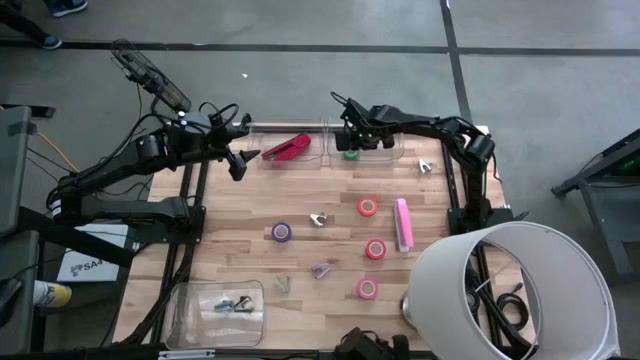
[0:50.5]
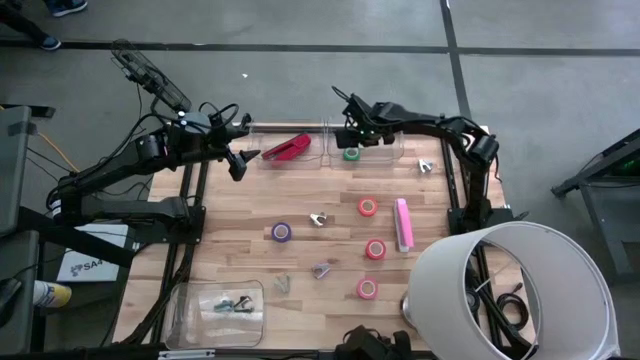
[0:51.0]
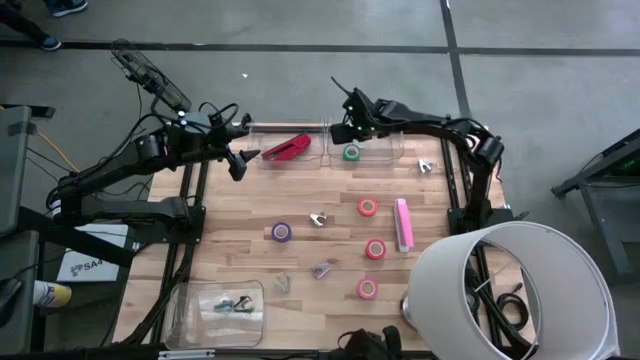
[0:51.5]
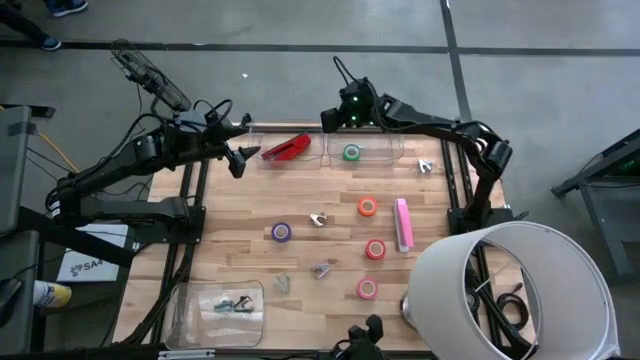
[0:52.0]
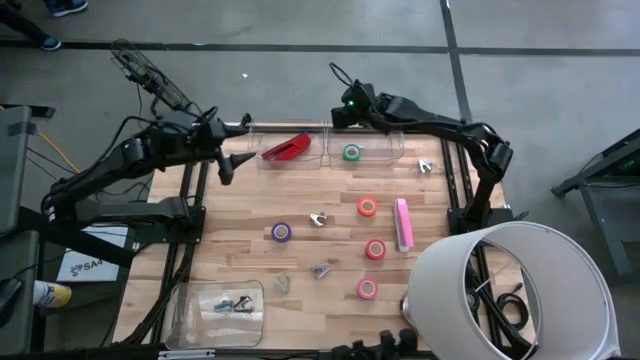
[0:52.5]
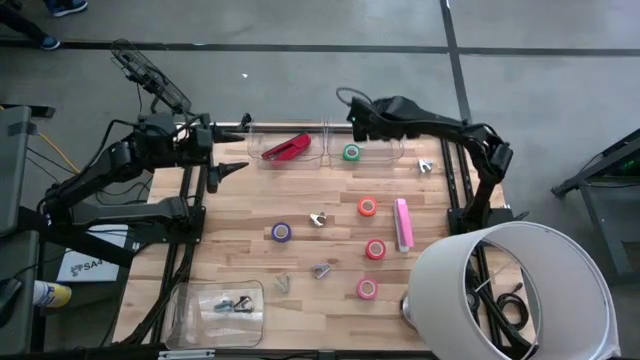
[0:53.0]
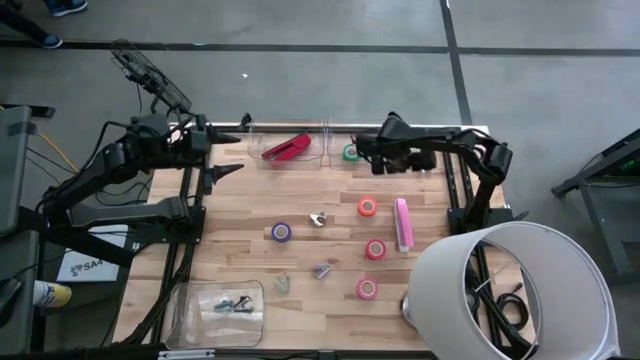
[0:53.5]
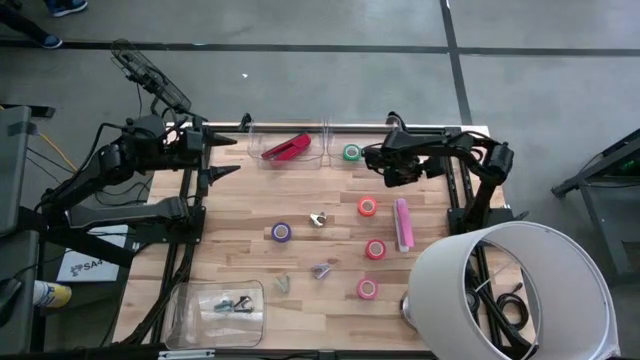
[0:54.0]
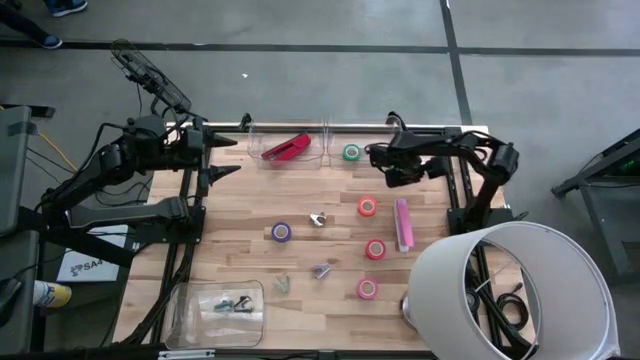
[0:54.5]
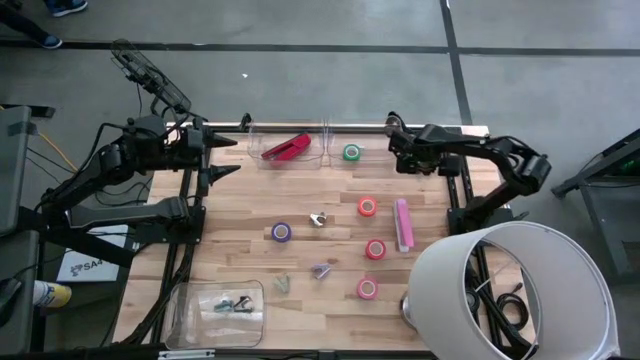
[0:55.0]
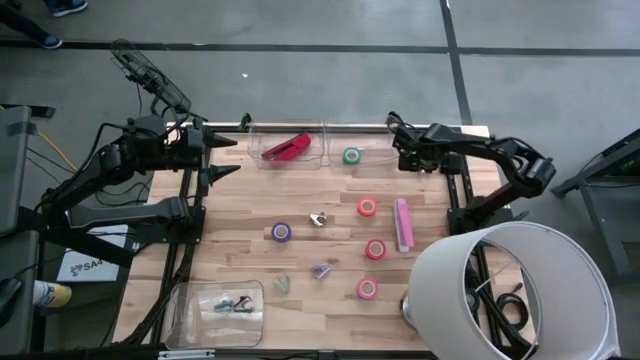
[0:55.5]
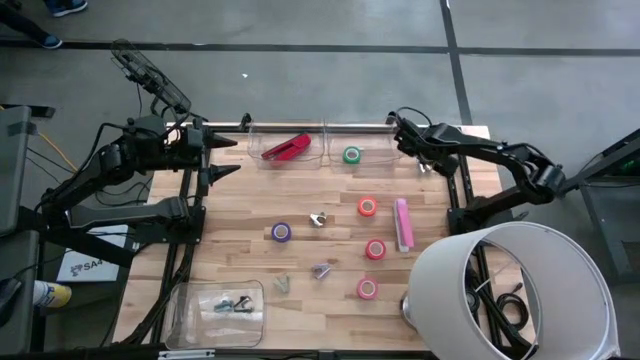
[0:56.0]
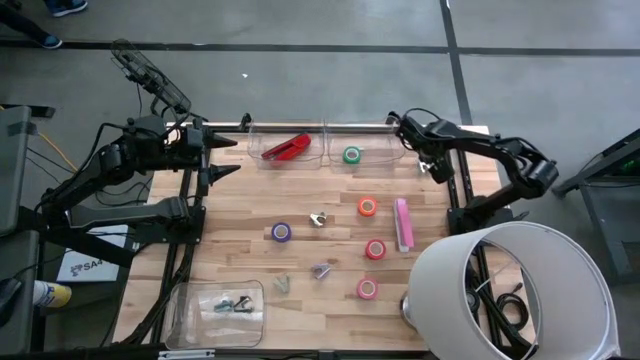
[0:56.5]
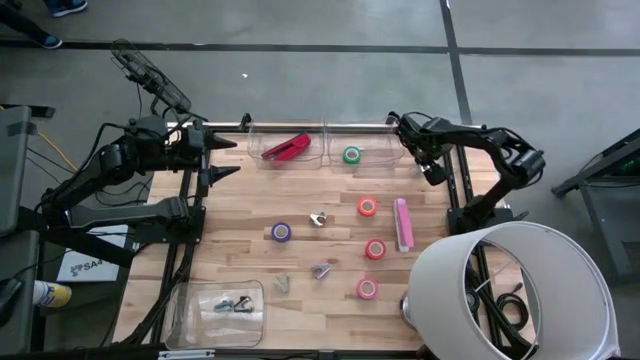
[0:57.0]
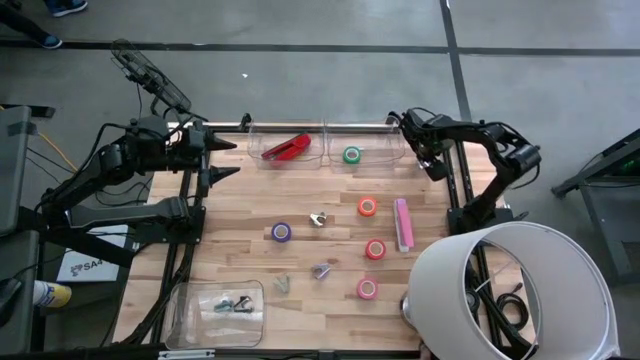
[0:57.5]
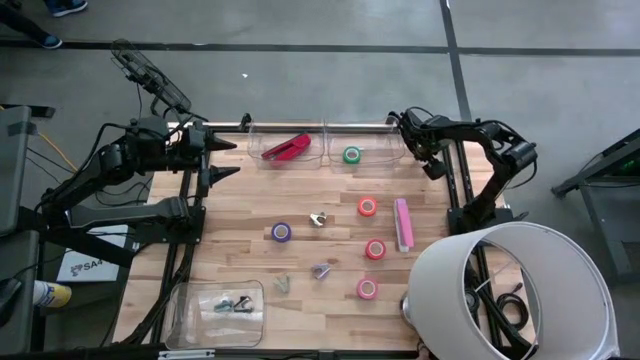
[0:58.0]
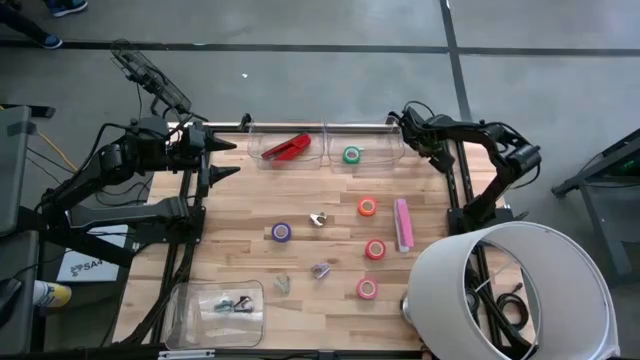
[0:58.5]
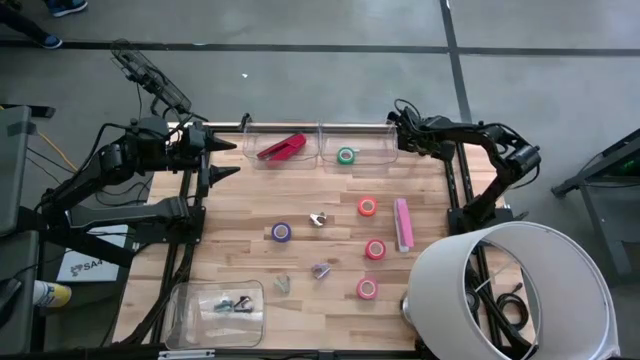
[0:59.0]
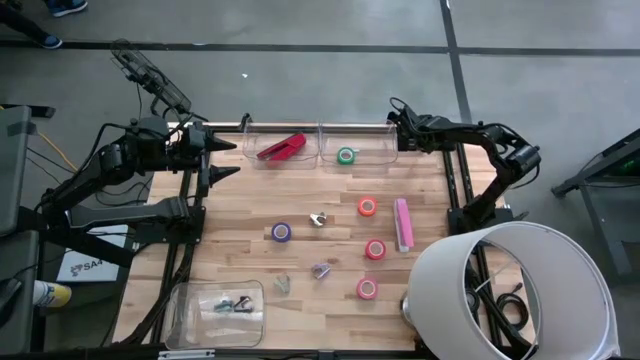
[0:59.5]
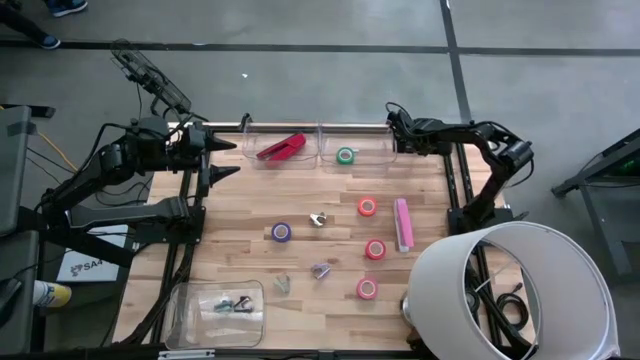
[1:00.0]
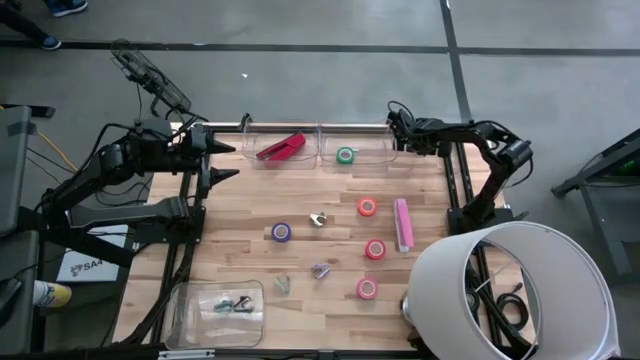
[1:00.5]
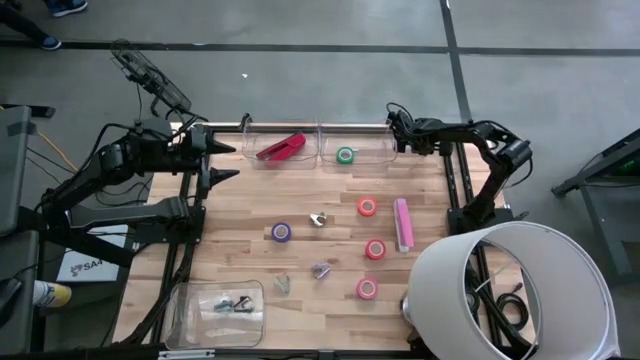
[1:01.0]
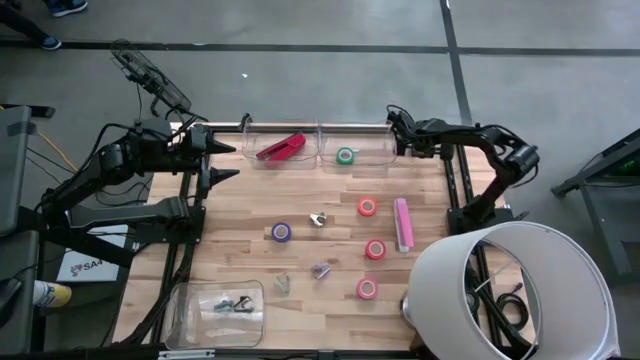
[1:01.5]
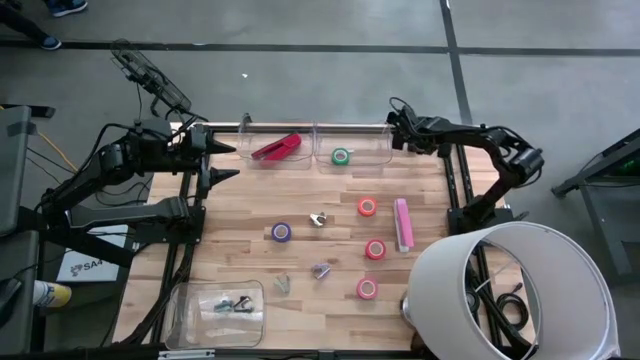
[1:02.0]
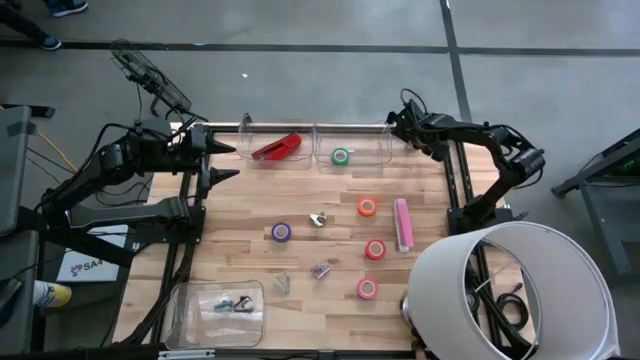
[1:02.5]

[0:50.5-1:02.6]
Task: Pick and place Stapler, Stapler remover, tape
Put the blue stapler remover into the bottom transparent bin

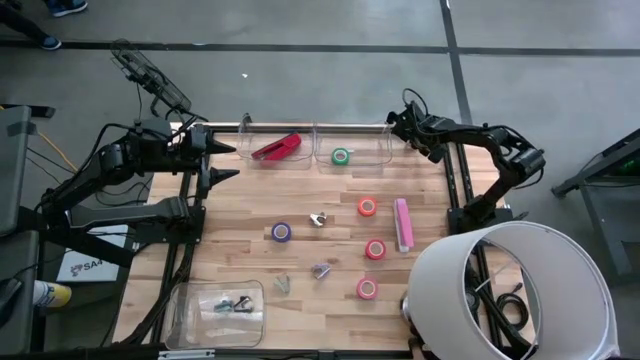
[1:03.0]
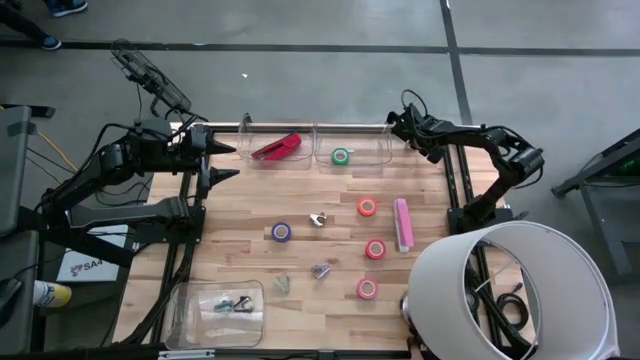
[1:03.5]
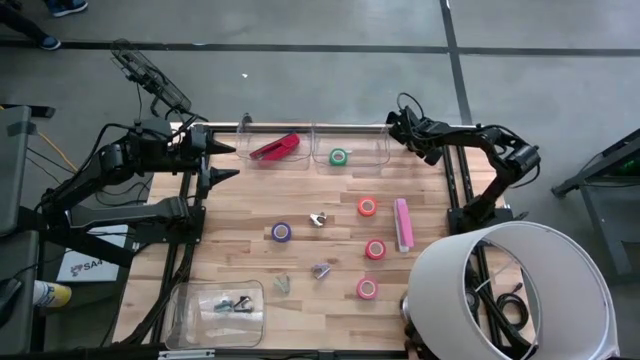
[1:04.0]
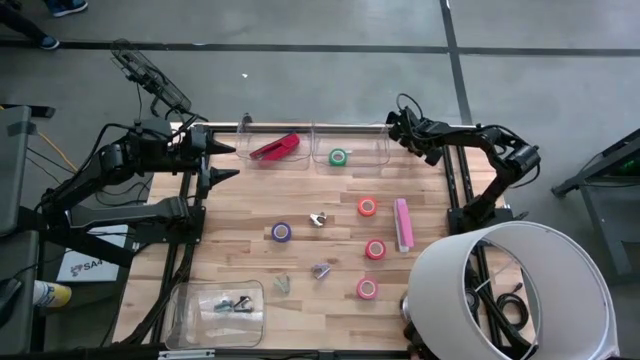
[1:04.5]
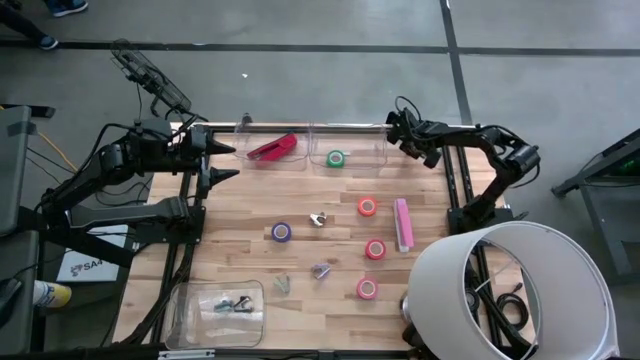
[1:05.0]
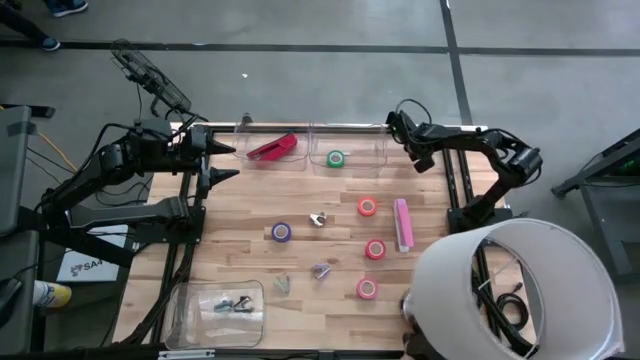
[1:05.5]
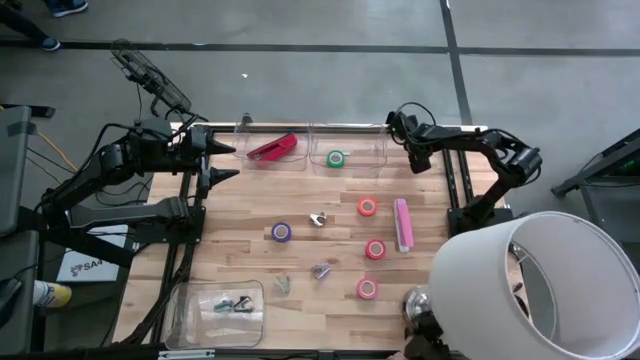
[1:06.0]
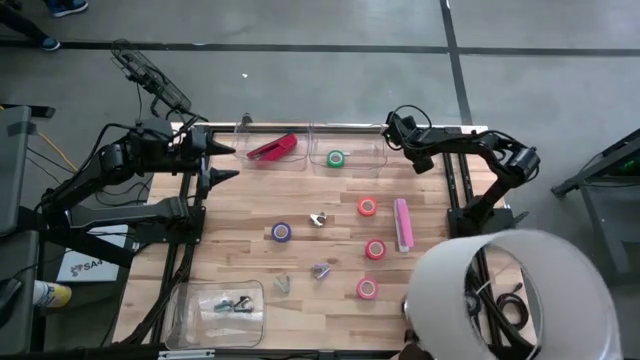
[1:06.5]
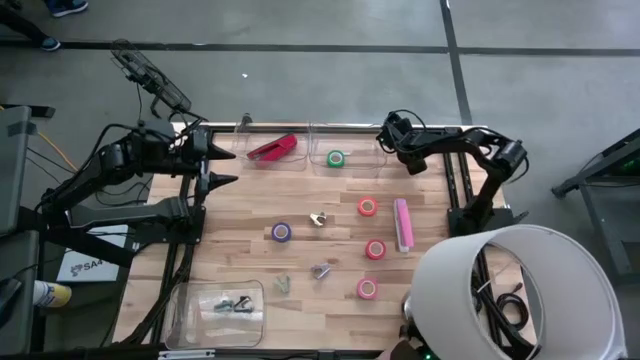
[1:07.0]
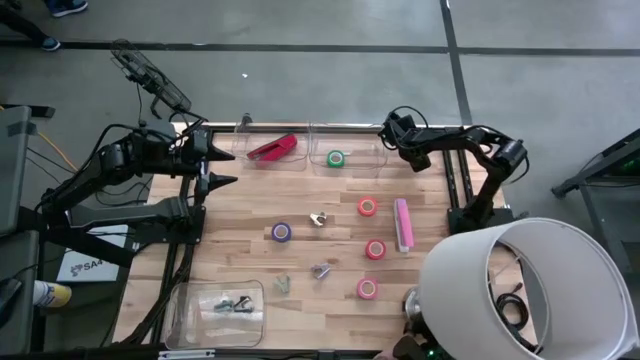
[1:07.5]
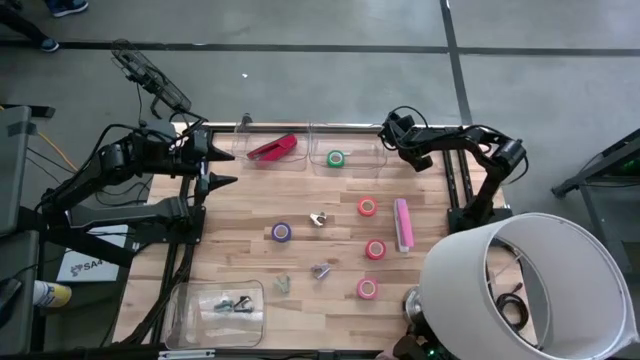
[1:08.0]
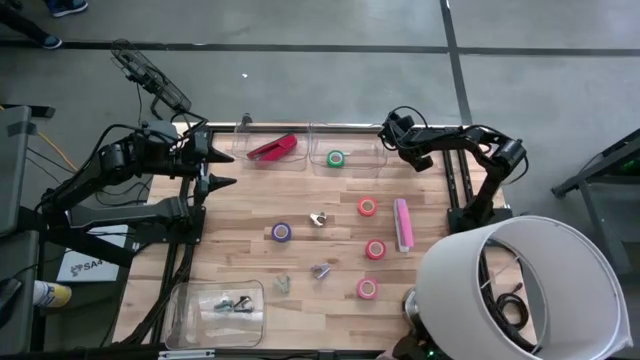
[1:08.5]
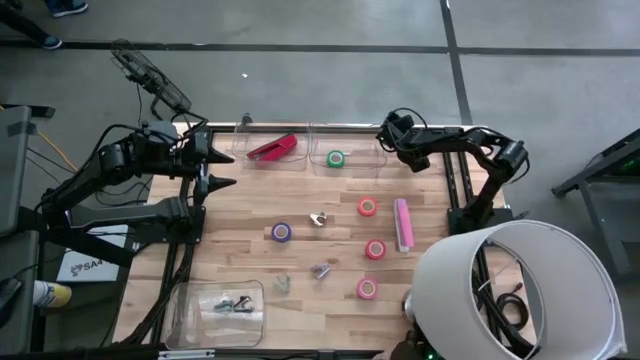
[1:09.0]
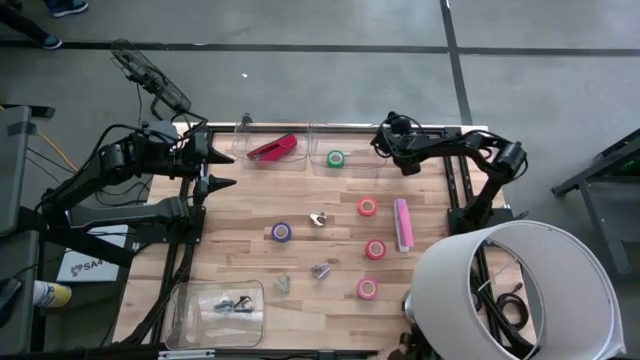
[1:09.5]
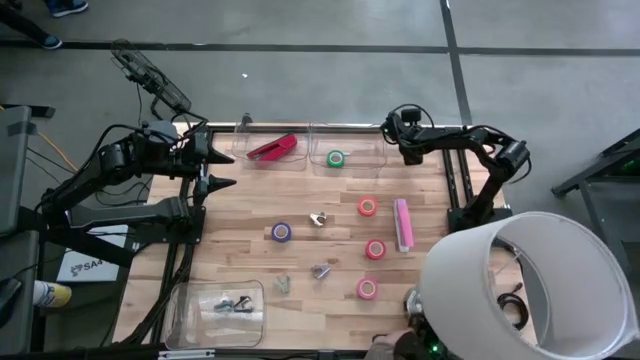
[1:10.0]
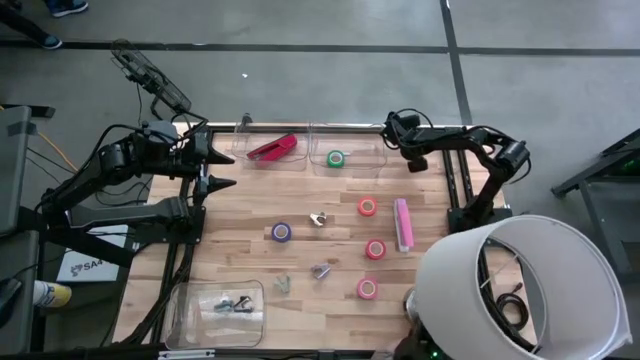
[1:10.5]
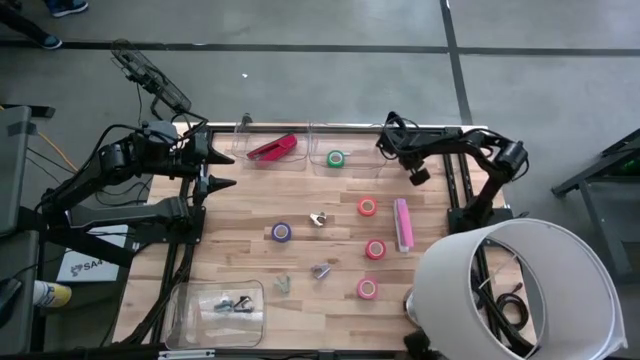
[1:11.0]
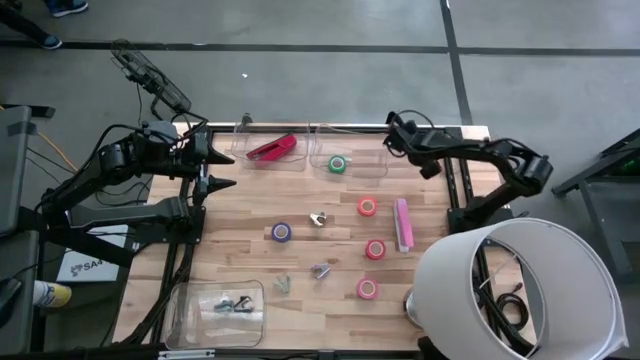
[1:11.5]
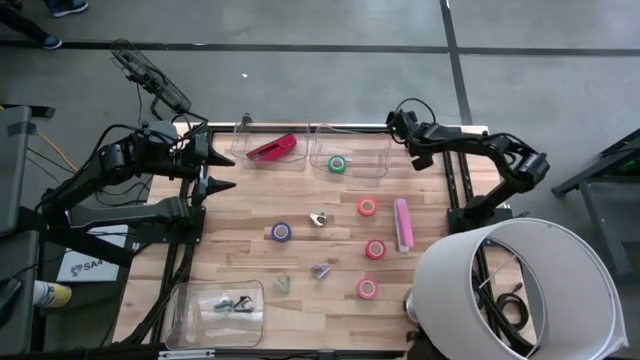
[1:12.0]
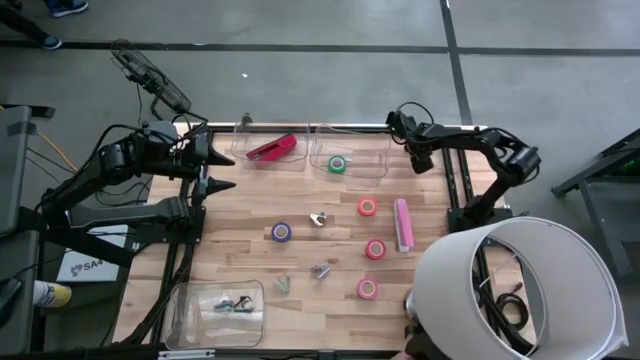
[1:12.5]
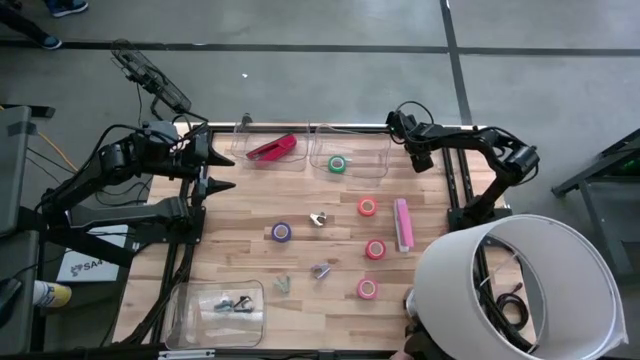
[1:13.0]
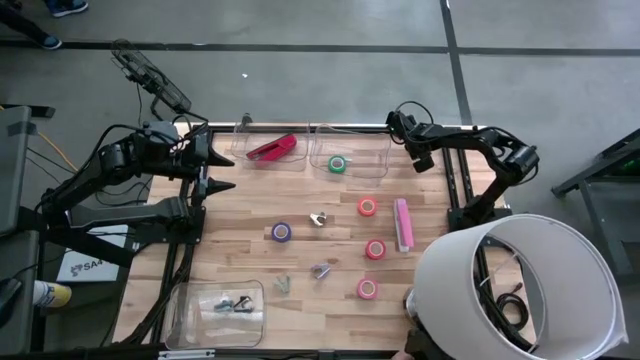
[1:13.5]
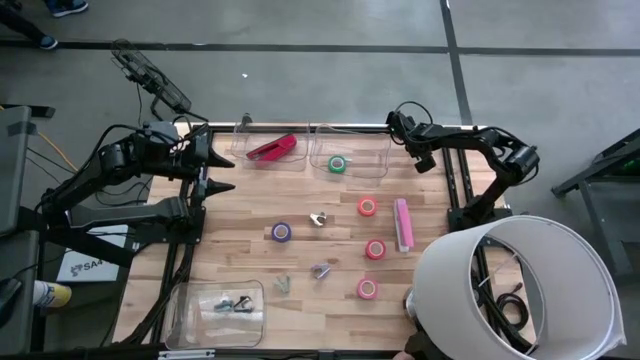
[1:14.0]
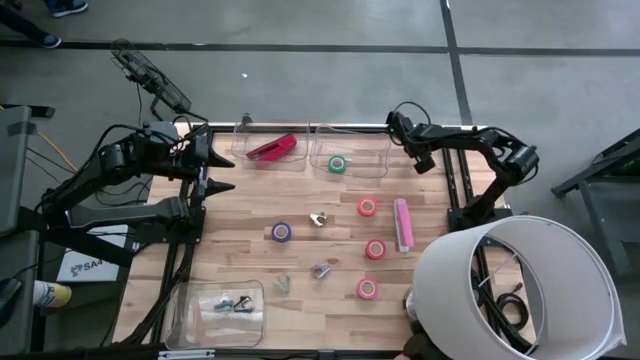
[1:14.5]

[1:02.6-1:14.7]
Put the blue stapler remover into the bottom transparent bin
